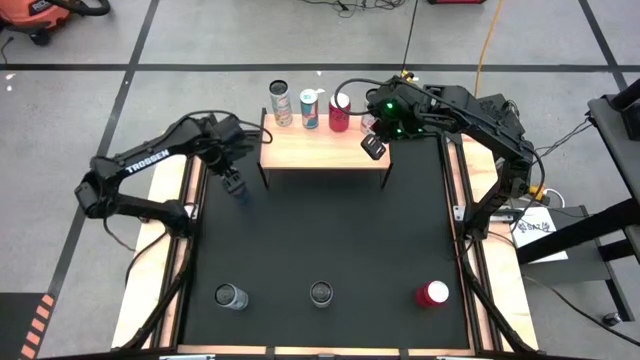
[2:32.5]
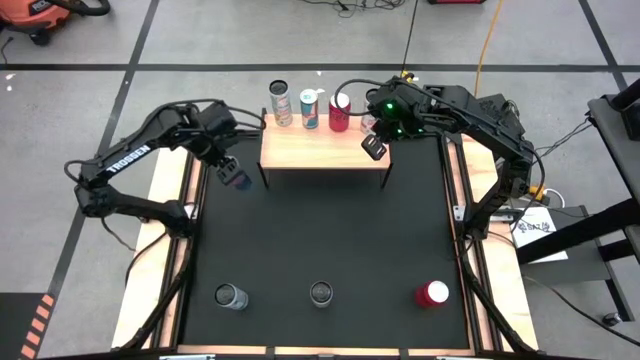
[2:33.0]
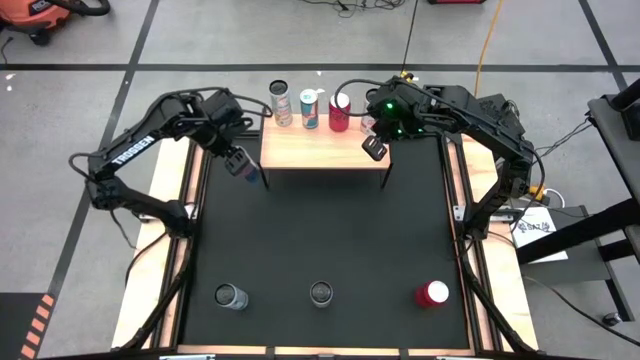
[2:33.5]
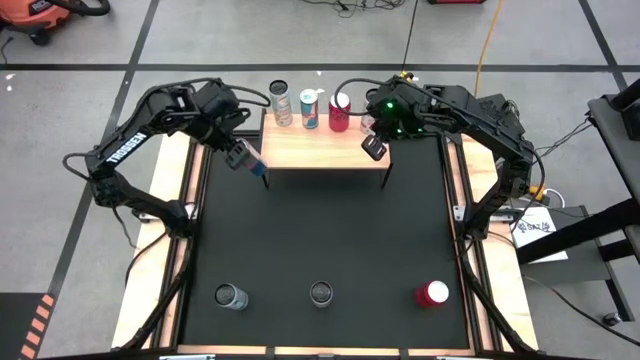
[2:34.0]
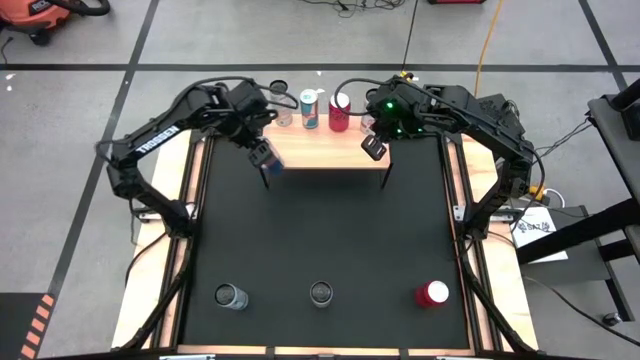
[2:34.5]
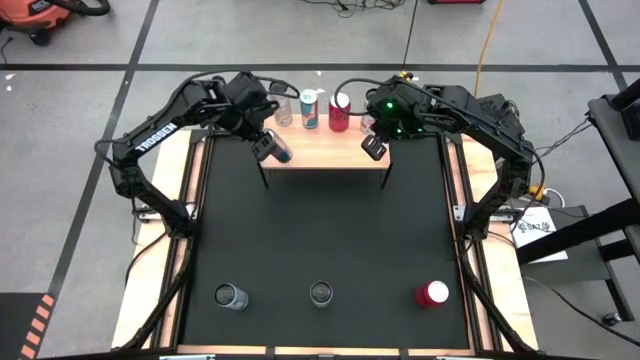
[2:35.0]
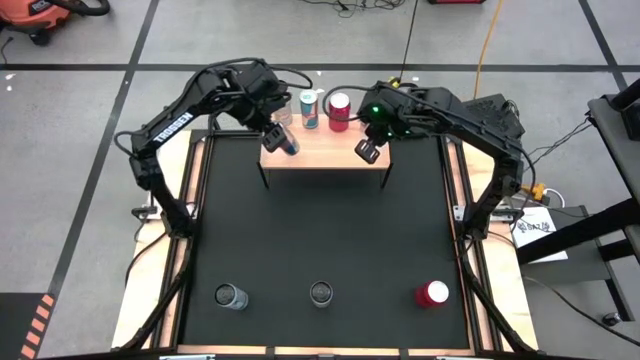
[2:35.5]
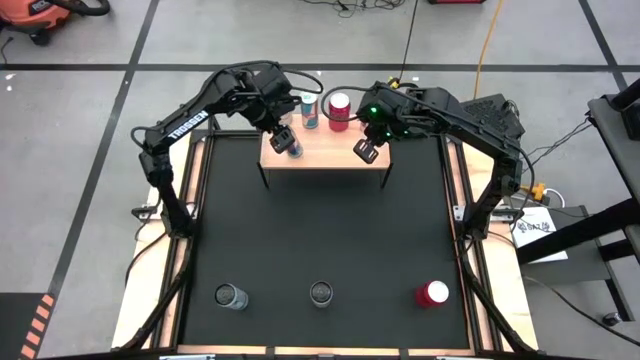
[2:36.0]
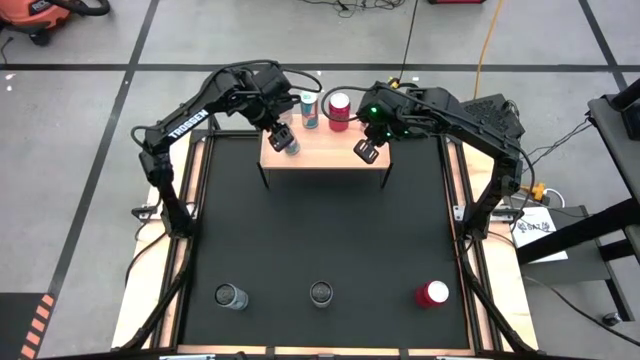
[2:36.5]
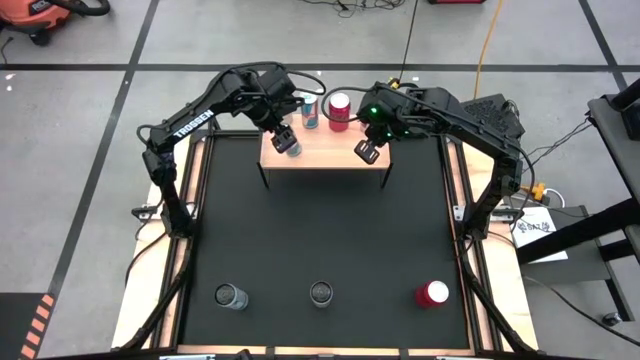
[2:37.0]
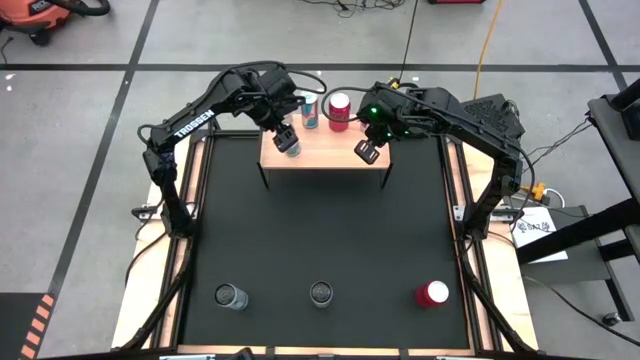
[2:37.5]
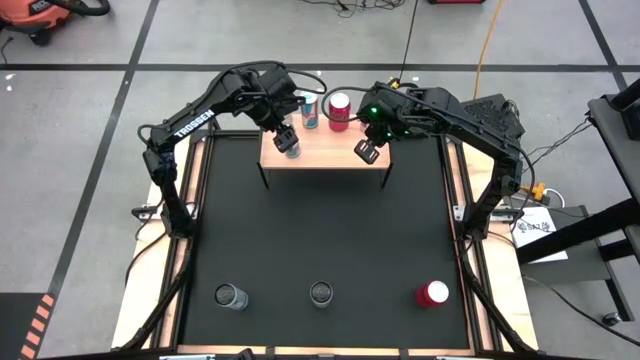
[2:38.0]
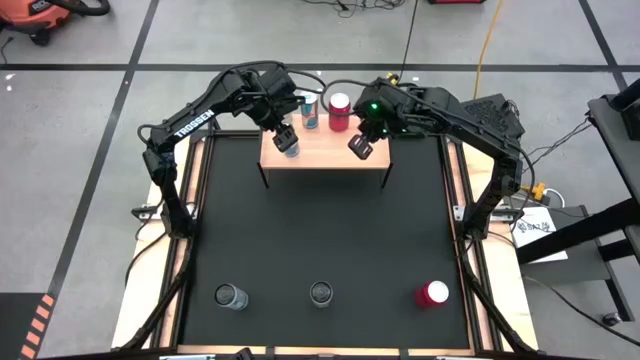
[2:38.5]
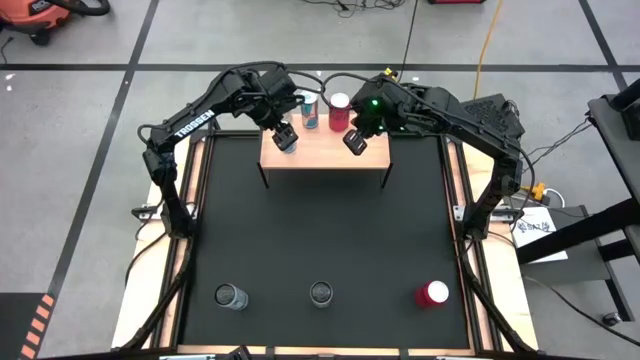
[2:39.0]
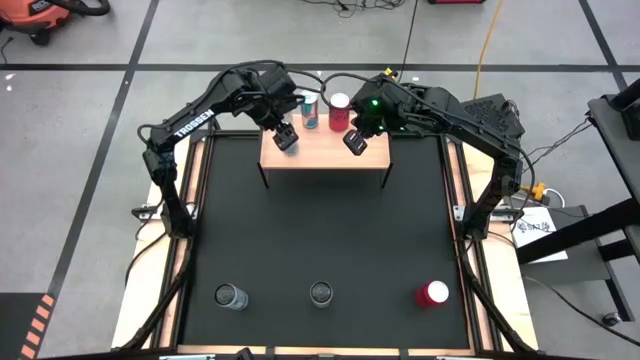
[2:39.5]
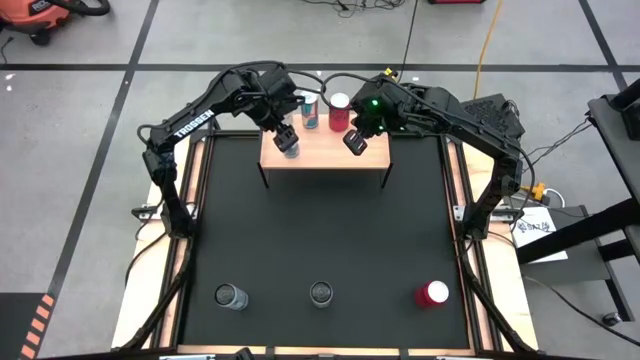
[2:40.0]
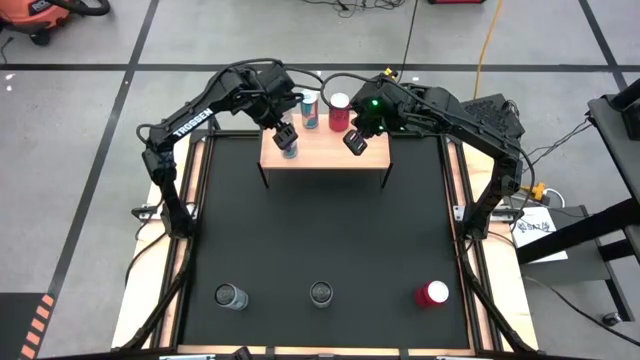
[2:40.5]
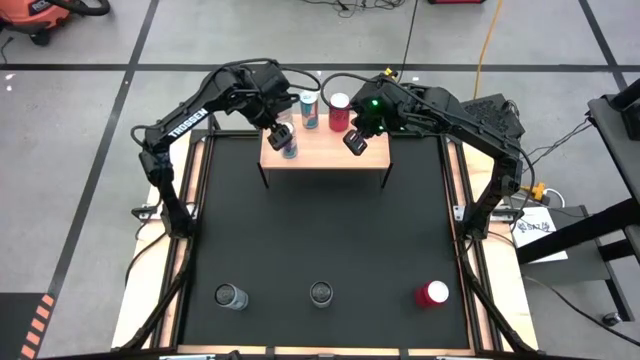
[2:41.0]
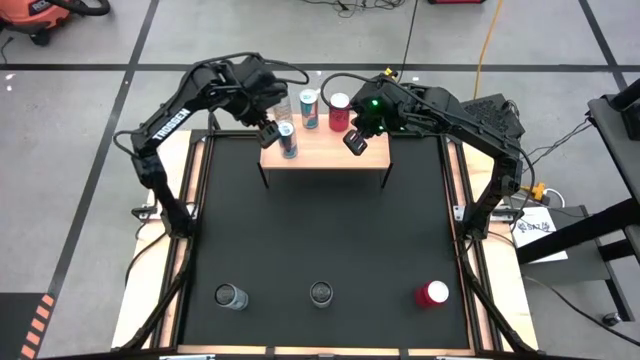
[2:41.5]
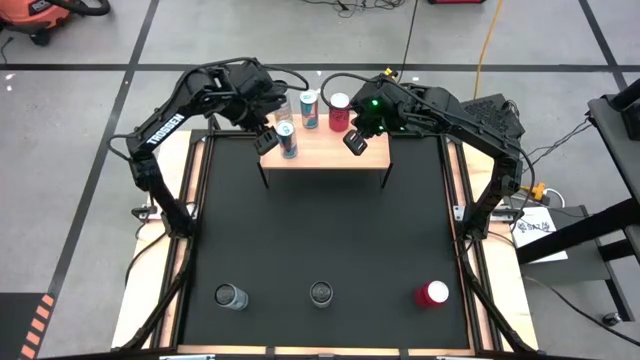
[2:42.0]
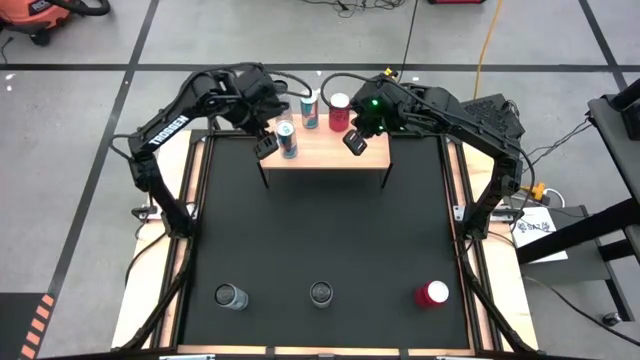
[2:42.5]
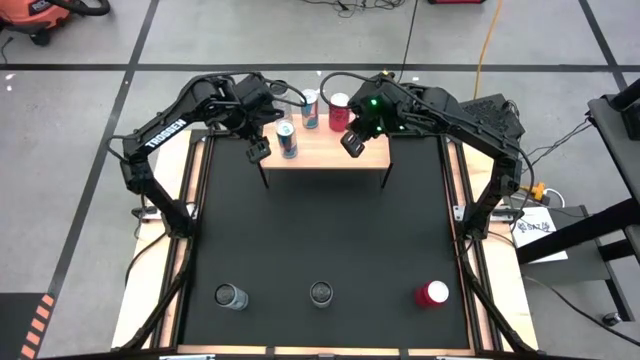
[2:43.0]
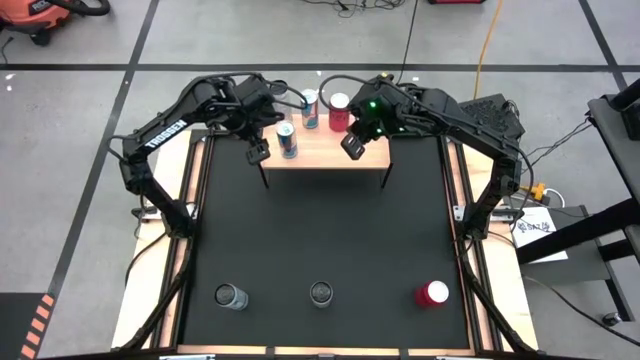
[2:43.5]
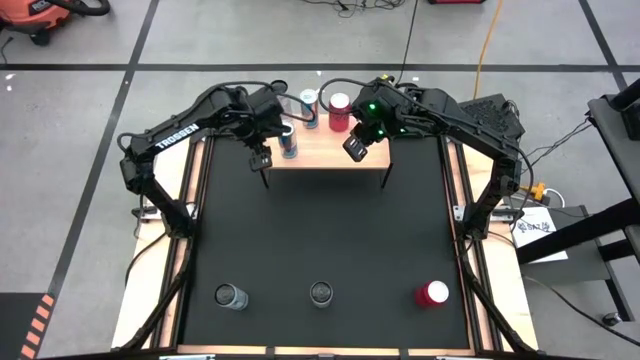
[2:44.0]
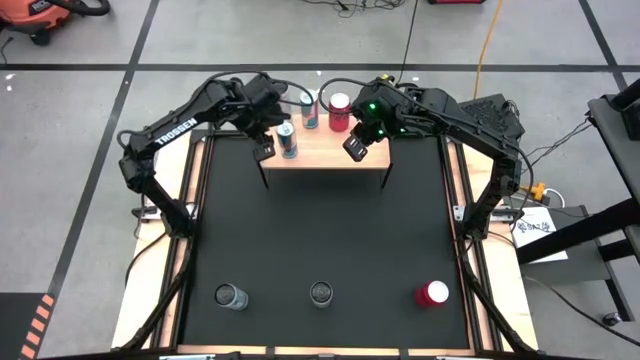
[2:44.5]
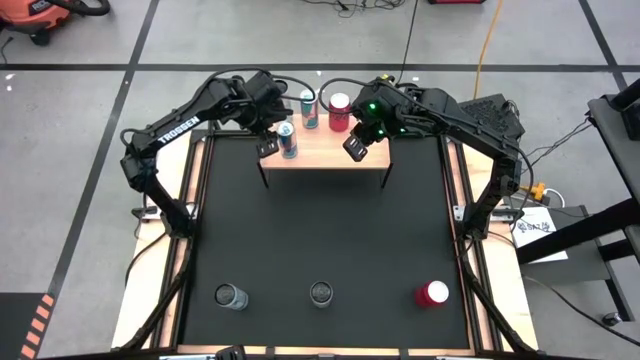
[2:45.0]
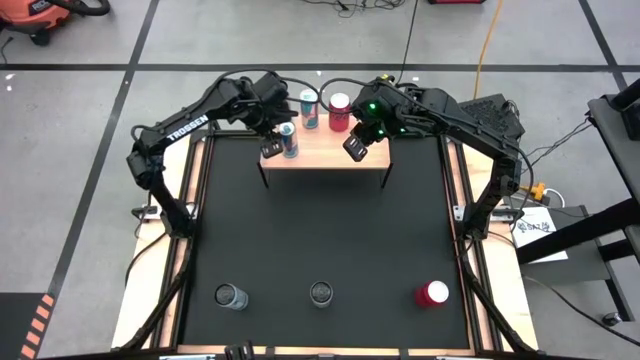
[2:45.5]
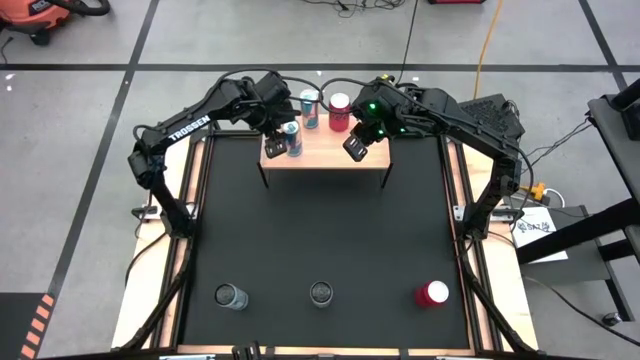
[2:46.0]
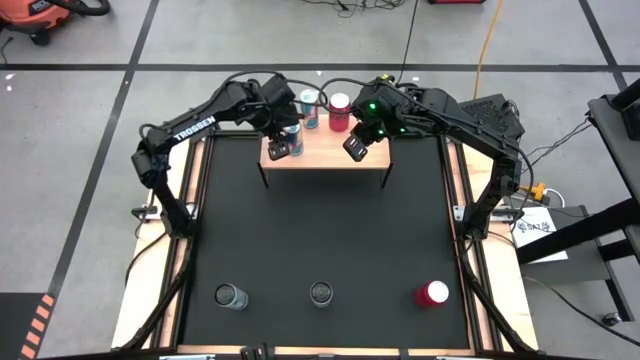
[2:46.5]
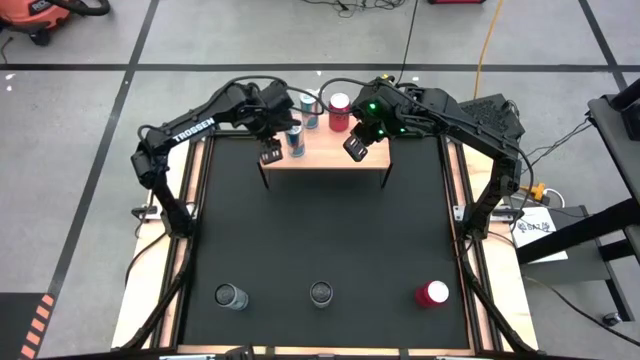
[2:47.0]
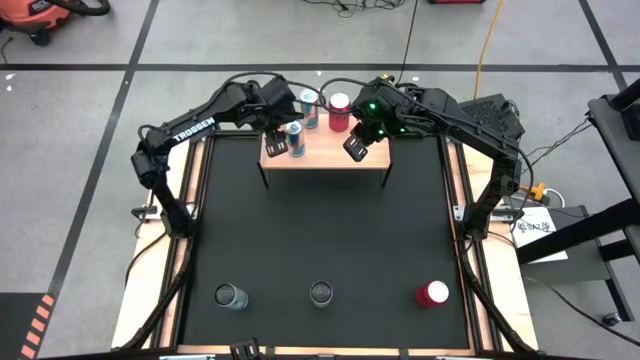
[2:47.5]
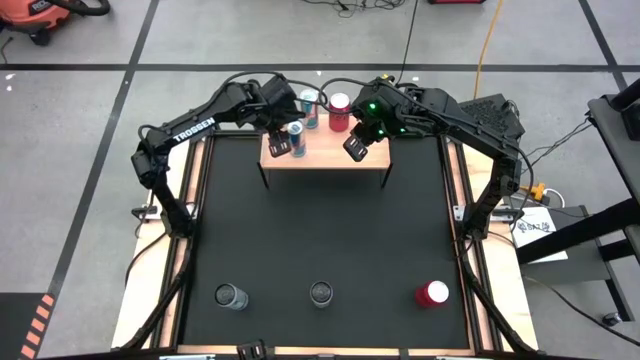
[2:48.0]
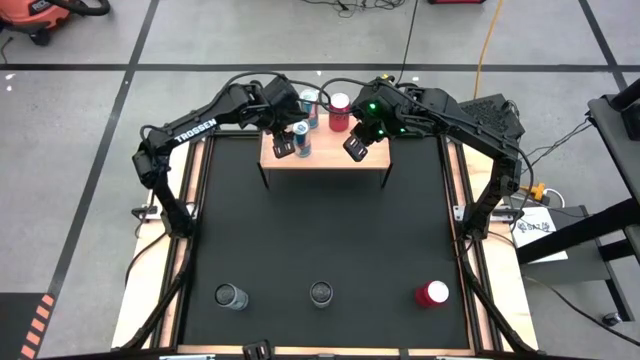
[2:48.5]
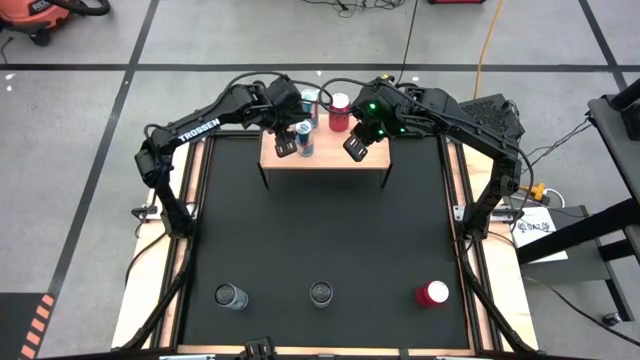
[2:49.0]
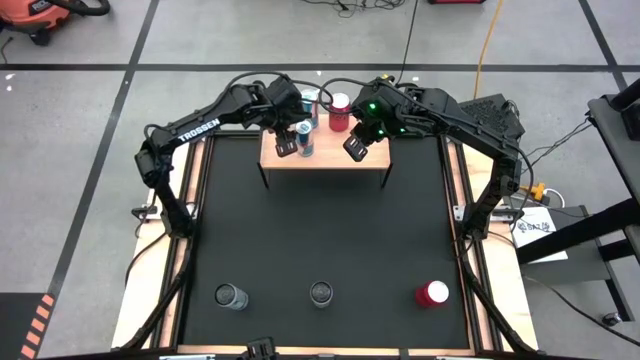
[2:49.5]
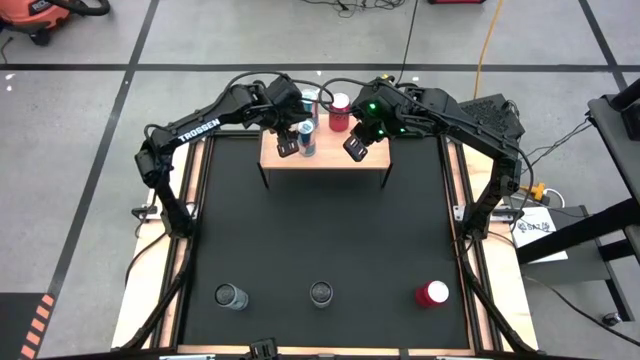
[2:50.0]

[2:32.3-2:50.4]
Task: Place canned beverage on shelf
Put the blue soda can on the shelf

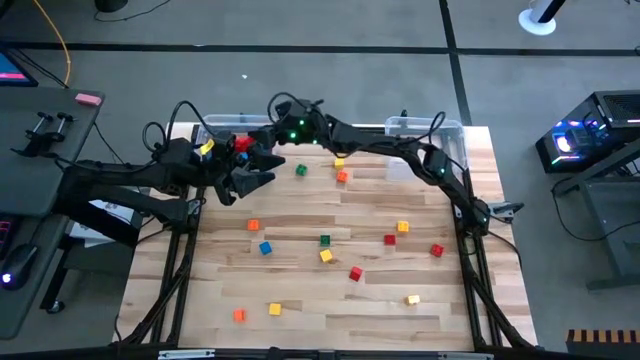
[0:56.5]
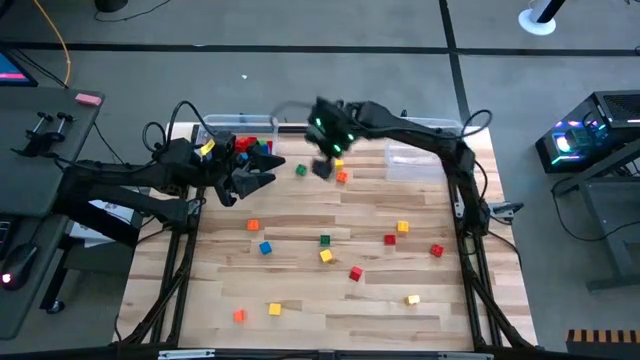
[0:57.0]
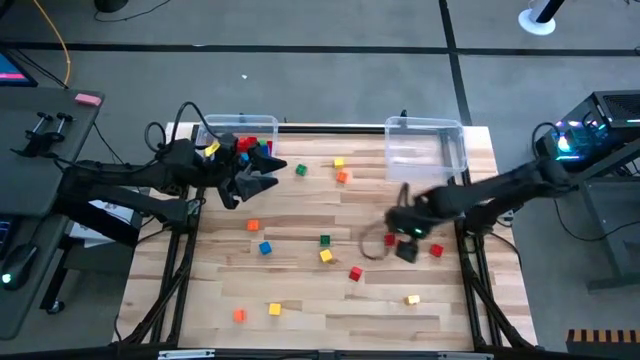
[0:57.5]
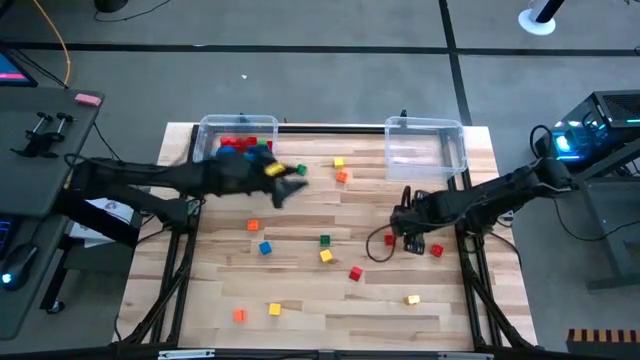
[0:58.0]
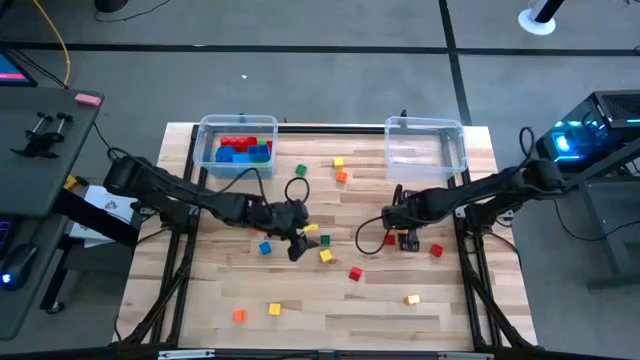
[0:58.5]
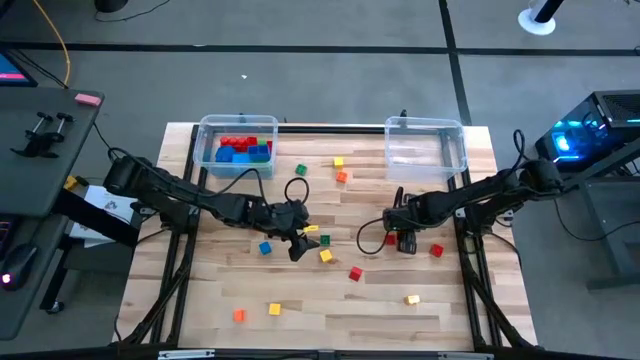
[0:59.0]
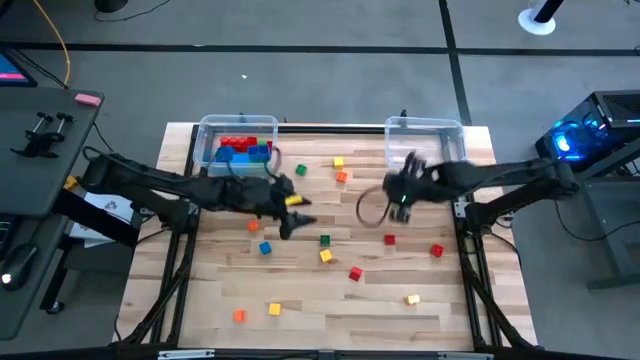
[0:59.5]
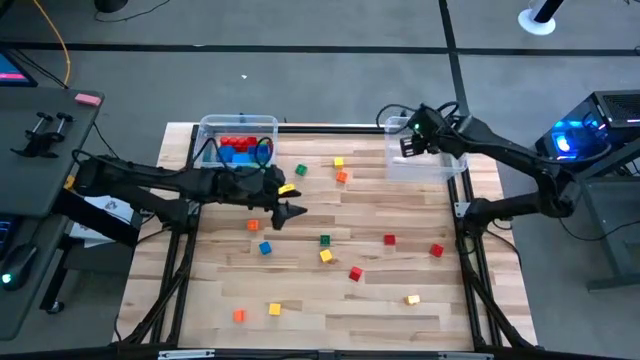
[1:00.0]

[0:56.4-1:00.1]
Task: Sort blocks by size
Put the small game piece into the right transparent bin

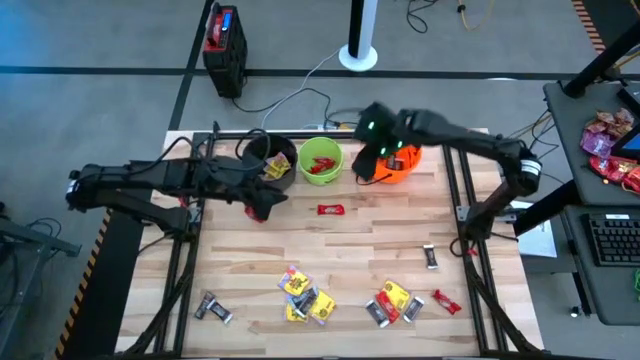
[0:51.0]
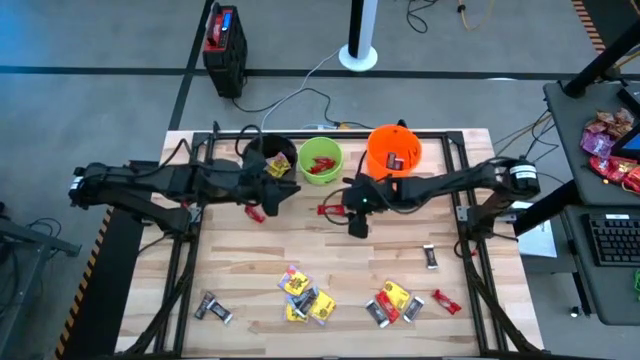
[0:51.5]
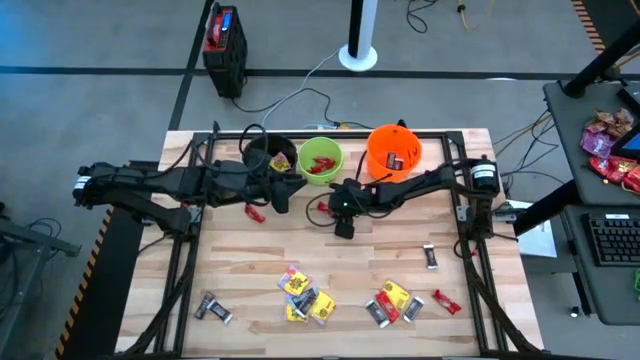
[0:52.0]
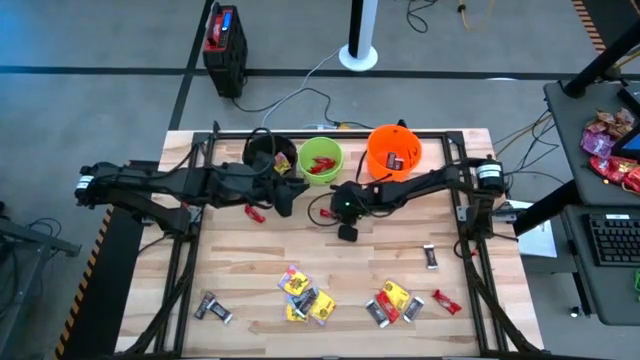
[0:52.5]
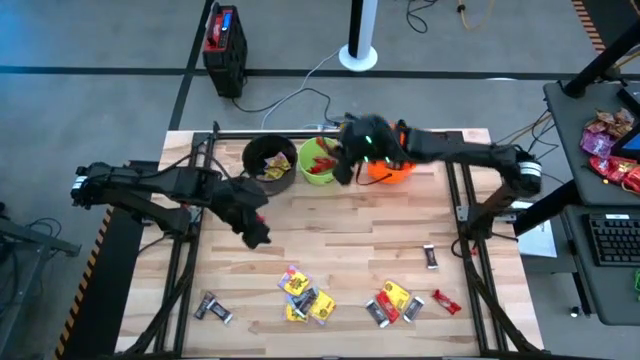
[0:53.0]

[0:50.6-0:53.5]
Task: Sort candy by brand, put in halloween buckets
Put the red chocolate bar into the green bucket
